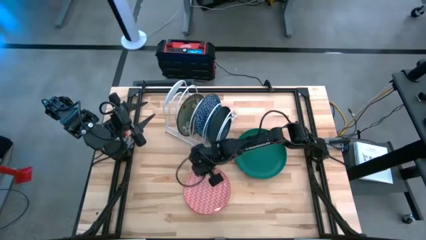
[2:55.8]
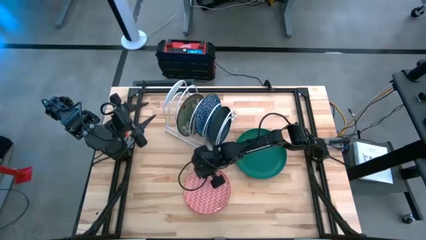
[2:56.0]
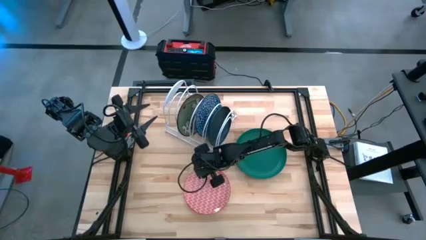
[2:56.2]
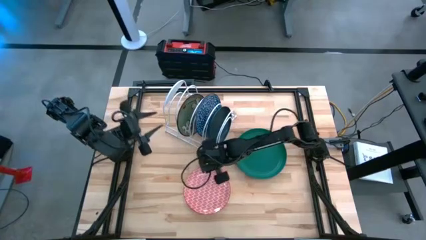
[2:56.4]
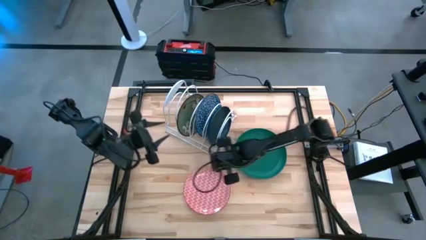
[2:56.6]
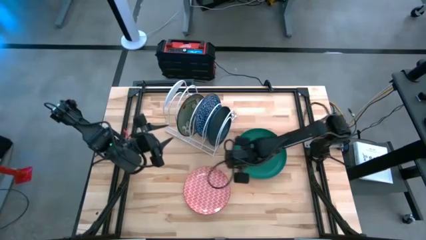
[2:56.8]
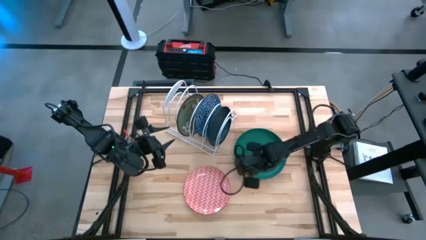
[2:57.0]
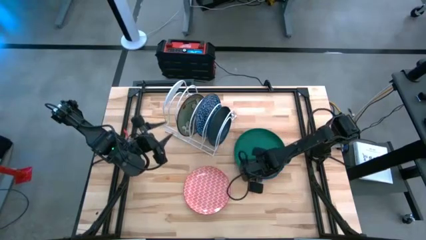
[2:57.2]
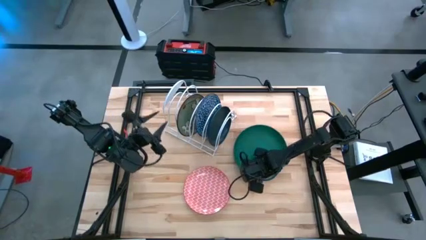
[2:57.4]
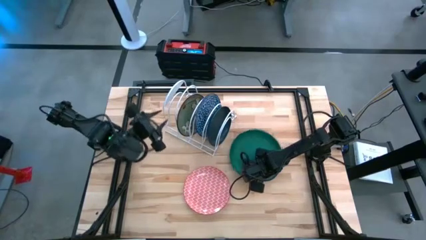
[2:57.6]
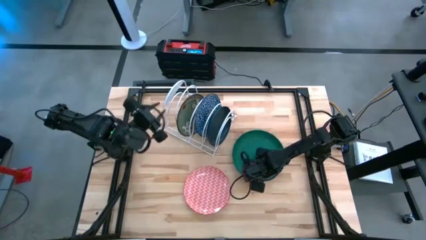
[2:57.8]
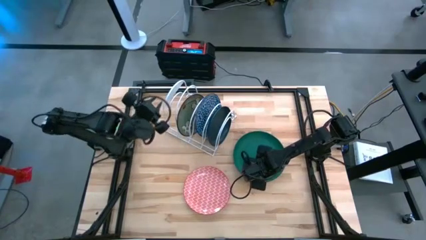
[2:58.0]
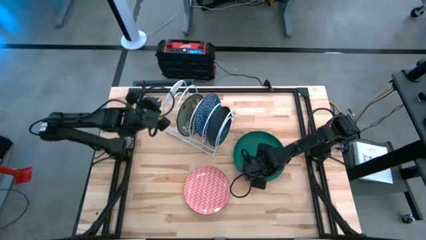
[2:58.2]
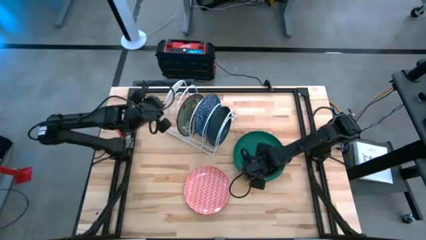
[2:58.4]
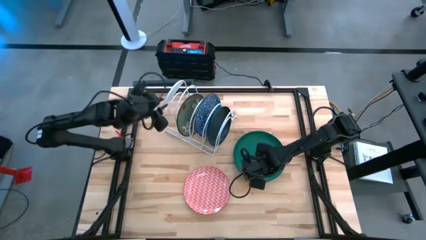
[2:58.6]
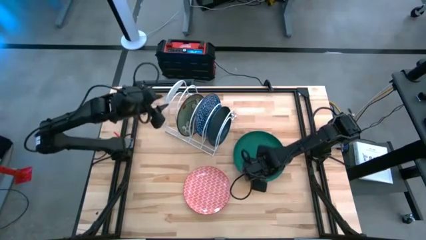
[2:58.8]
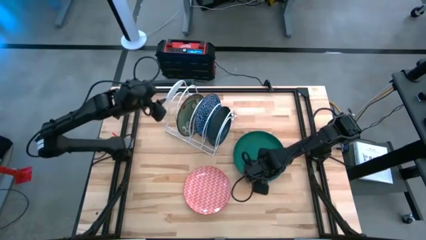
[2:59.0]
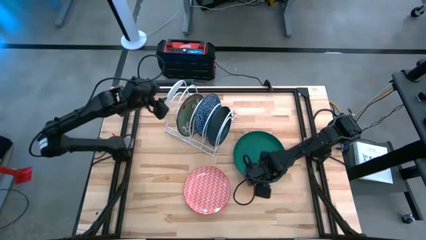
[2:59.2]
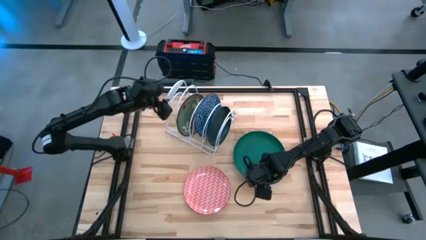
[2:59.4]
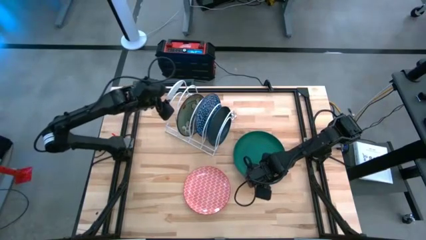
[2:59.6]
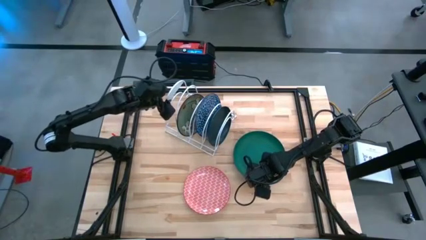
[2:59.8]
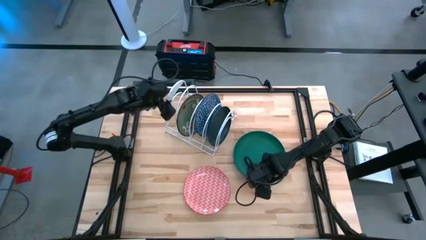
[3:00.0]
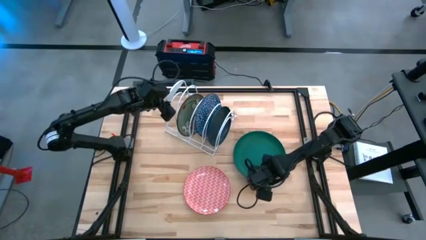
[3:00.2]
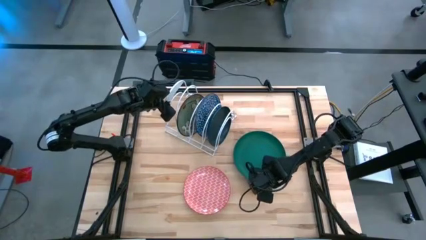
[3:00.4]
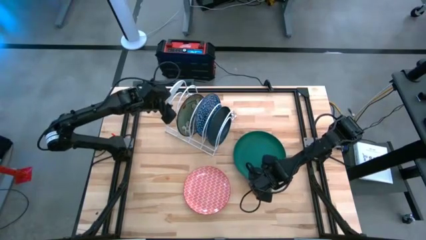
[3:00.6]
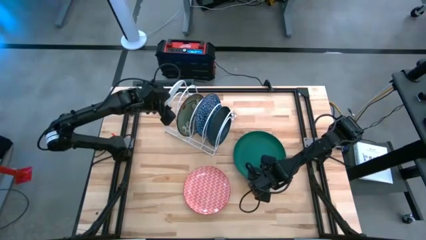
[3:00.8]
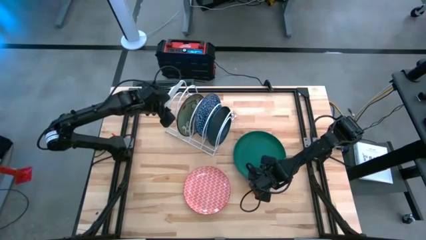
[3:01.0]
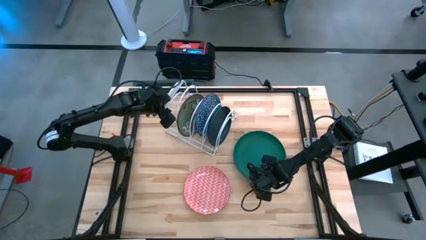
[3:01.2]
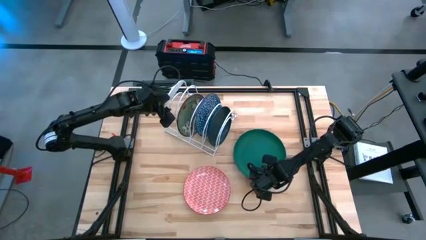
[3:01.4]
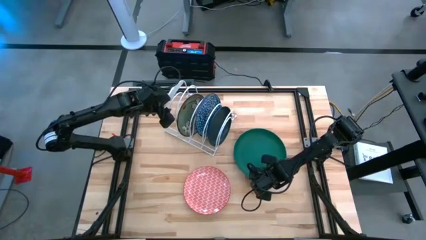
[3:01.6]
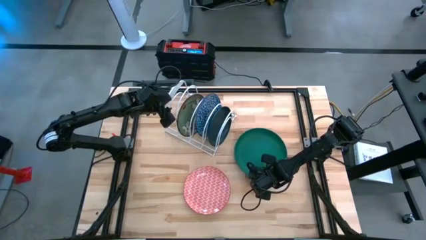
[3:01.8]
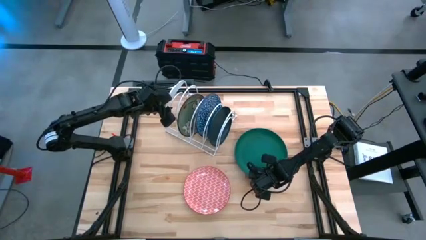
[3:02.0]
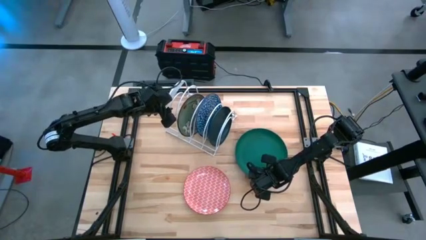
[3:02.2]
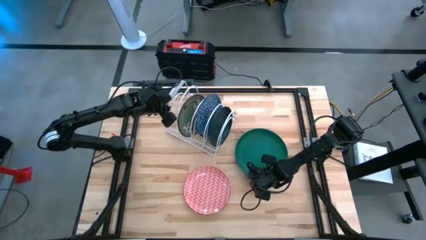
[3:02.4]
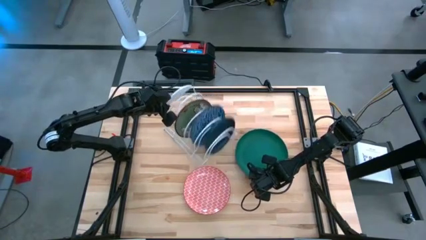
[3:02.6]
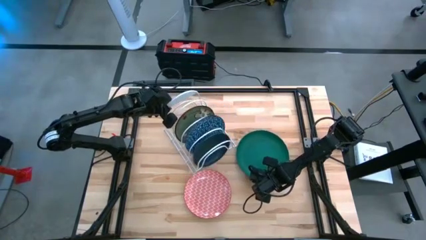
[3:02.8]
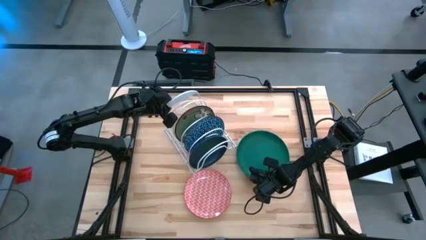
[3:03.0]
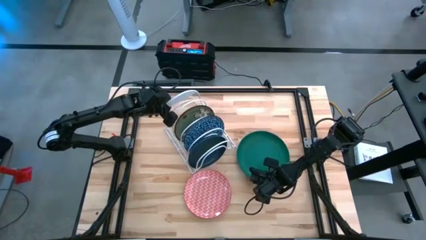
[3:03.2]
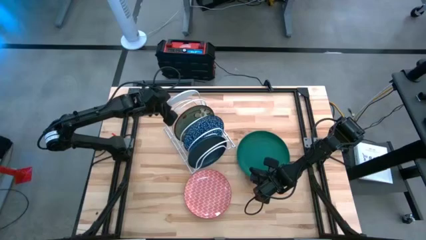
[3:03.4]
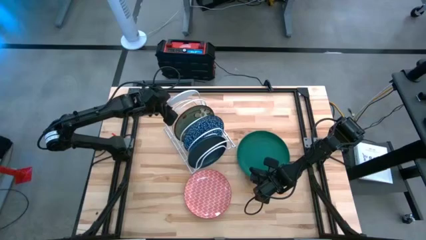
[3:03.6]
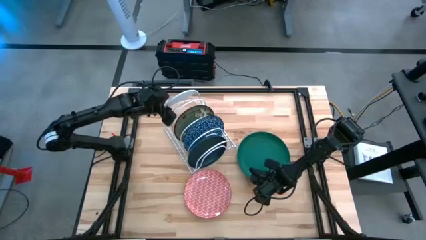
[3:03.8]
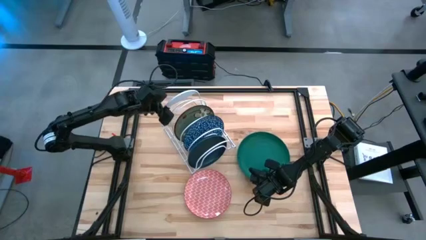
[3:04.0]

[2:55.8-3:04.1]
Task: Sort dishes
Put the dark green plate into the dish rack

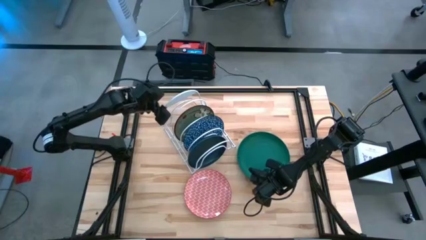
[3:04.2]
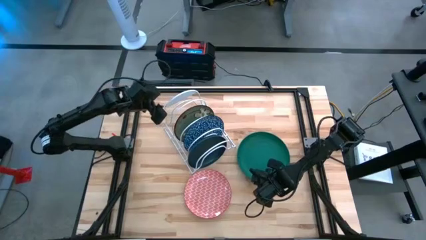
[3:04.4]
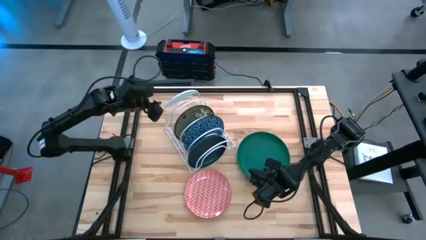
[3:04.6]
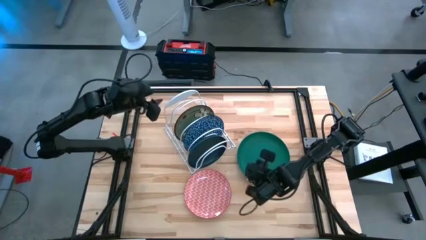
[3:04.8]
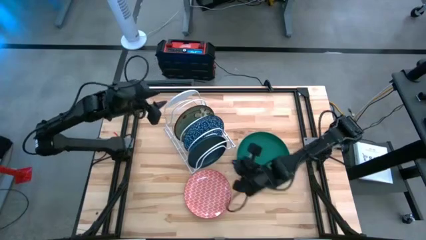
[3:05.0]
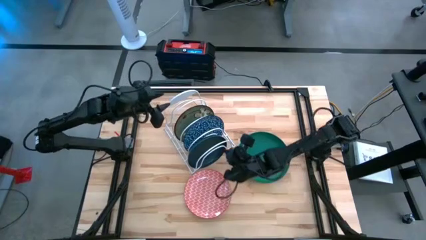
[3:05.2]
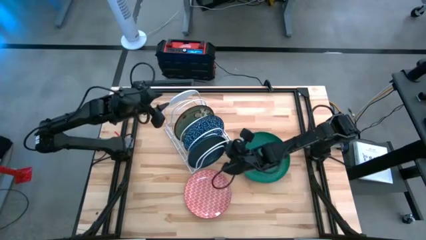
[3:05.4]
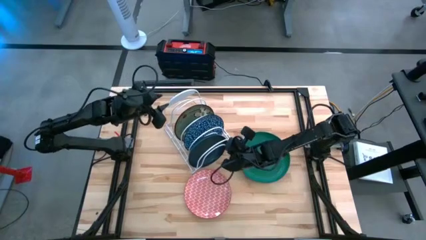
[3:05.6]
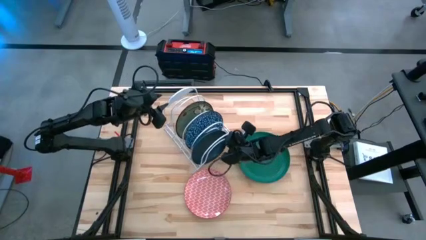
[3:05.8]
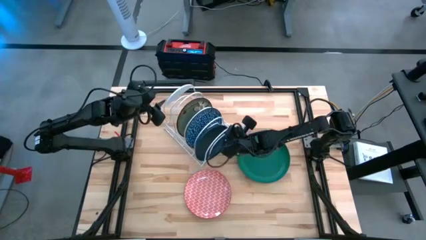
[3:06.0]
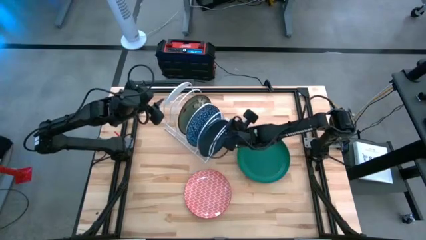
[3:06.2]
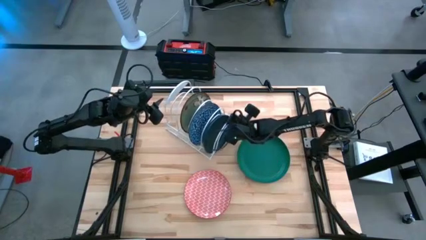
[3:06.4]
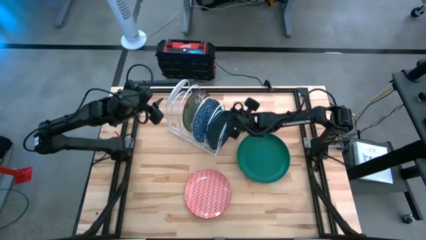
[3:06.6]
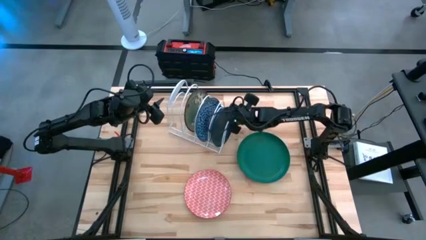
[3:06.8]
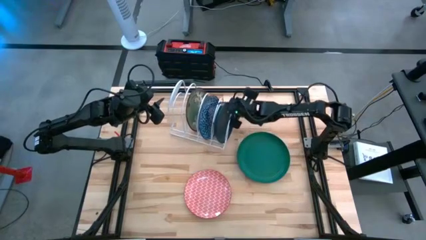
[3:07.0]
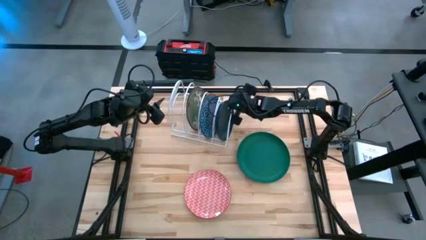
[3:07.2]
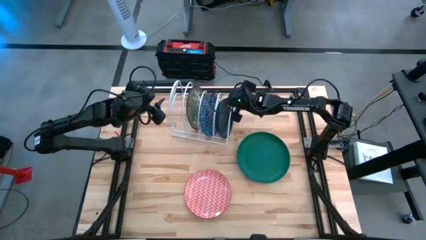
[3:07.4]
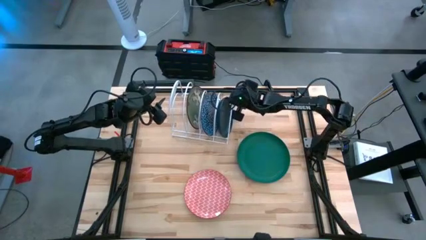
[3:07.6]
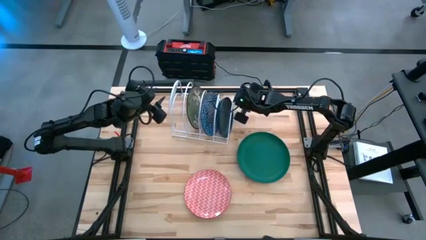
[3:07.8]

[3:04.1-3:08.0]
Adjust the dish rack

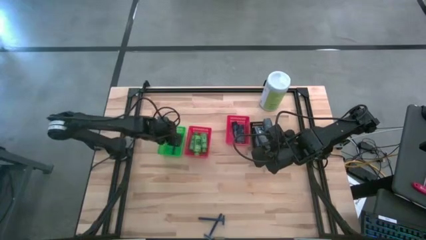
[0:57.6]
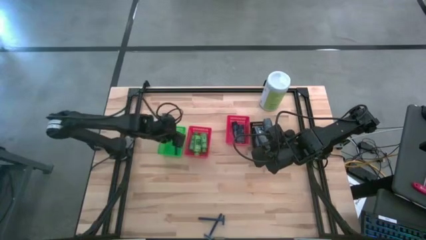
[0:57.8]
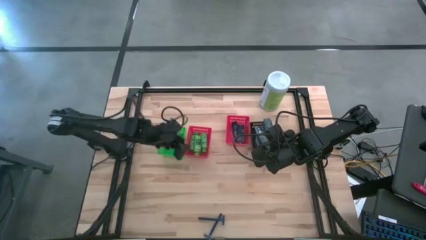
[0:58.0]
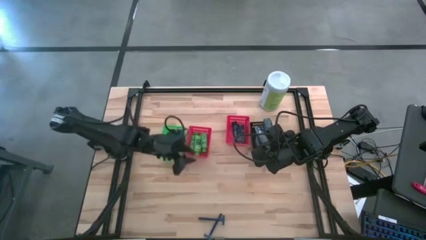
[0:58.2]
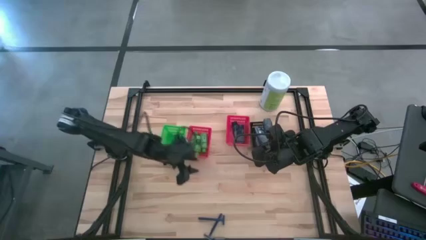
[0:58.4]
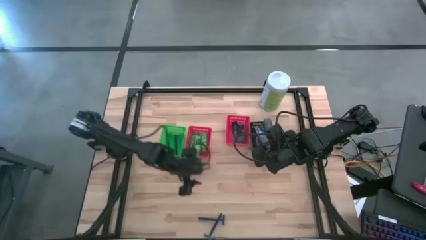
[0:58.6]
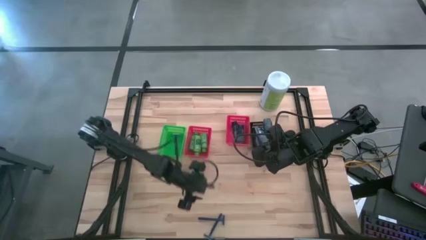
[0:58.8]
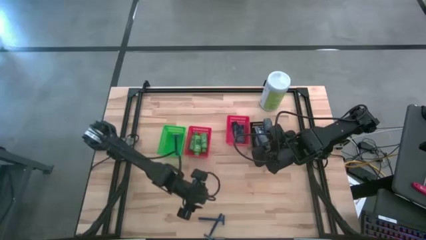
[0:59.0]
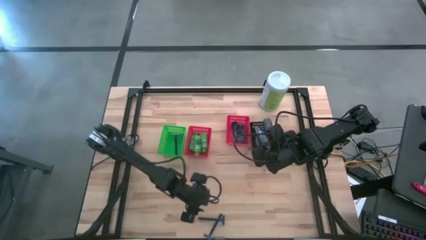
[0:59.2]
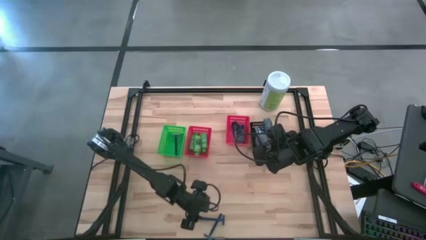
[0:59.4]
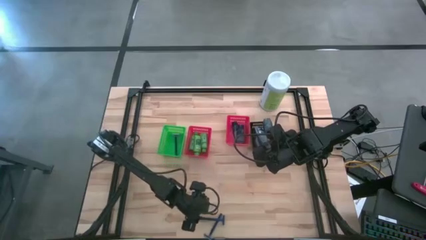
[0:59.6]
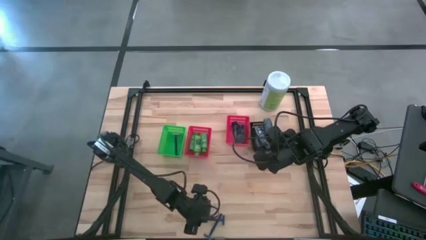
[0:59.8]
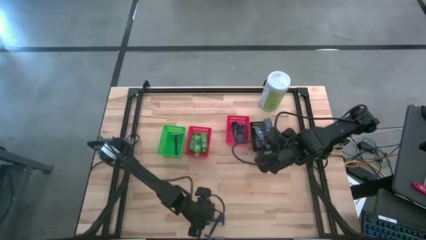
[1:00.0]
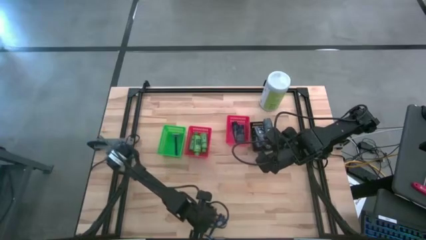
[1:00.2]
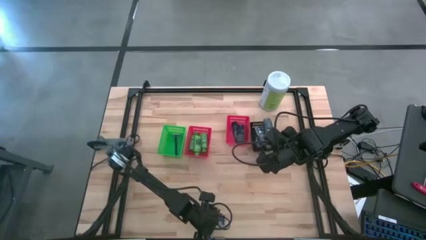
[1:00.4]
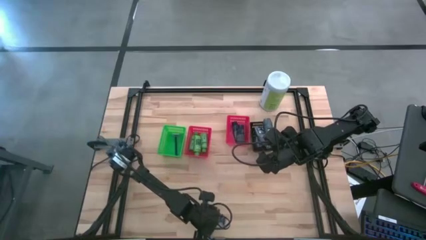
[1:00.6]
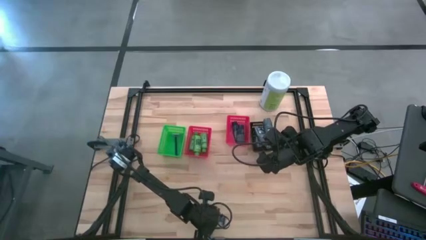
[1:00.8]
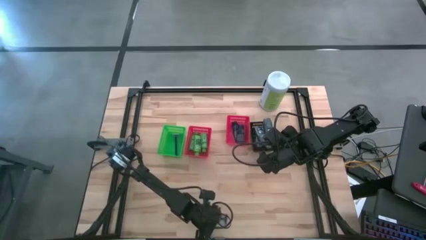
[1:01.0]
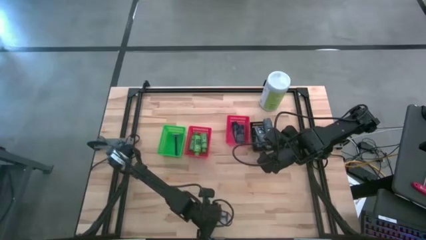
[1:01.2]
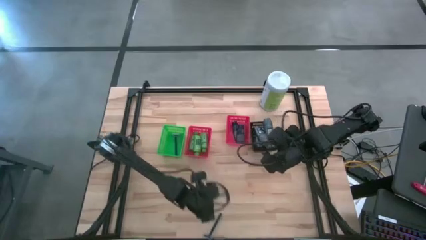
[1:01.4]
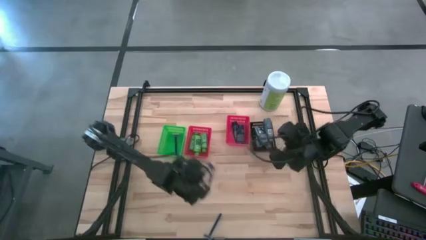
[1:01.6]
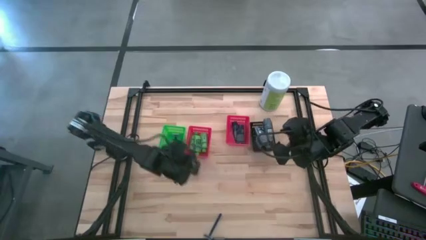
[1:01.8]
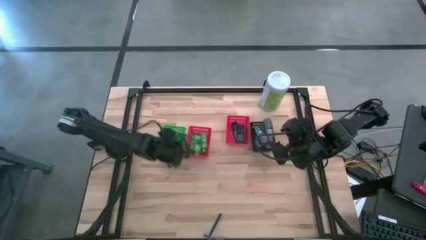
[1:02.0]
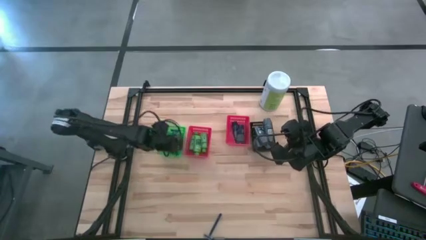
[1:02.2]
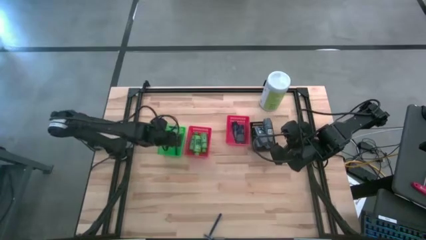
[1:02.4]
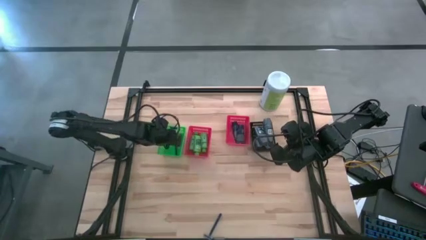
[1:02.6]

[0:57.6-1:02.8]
Task: Pick & Place Travel size toiletries
Put the blue razor into the green basket
